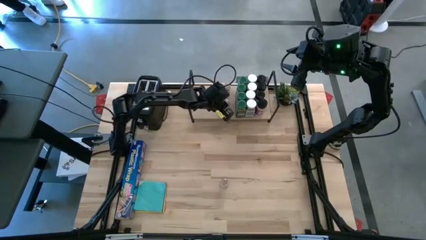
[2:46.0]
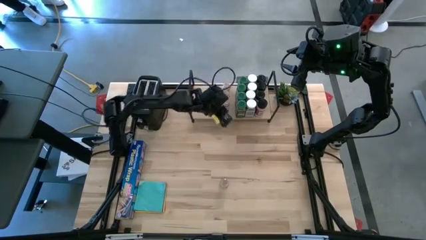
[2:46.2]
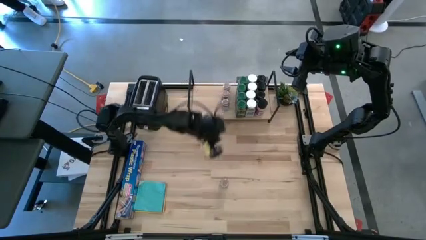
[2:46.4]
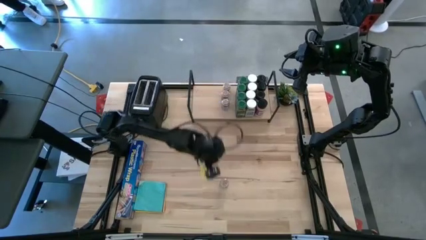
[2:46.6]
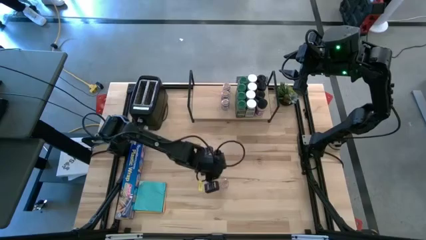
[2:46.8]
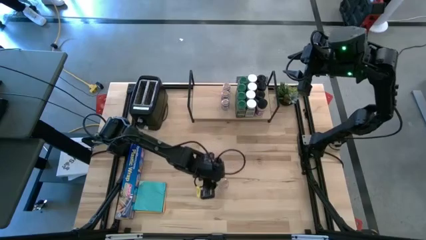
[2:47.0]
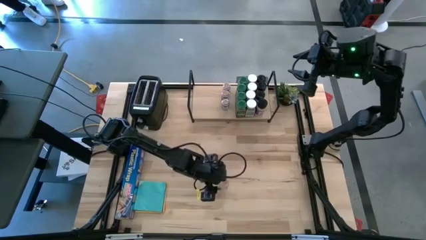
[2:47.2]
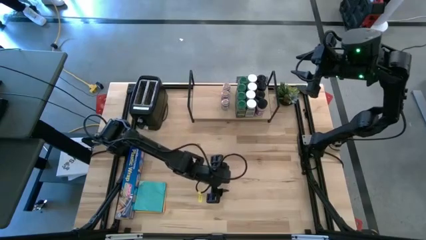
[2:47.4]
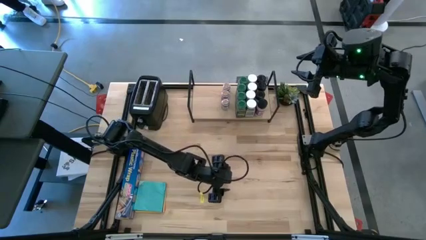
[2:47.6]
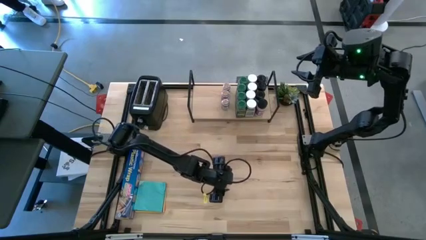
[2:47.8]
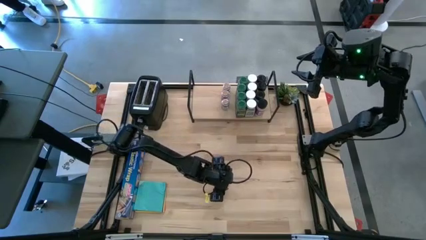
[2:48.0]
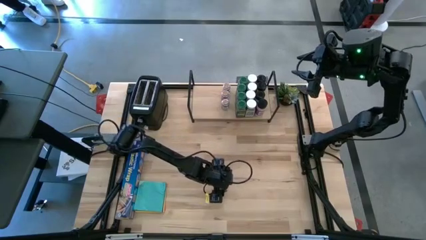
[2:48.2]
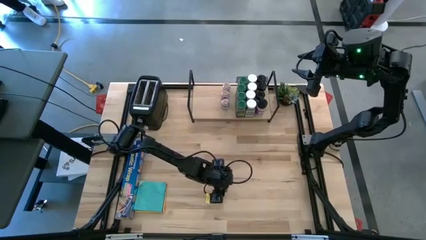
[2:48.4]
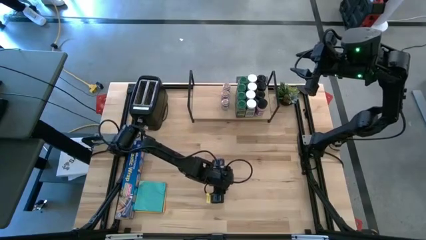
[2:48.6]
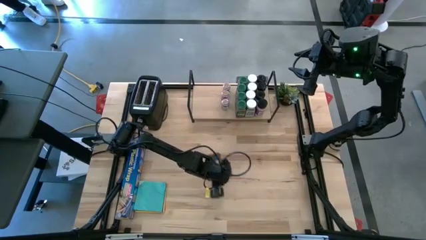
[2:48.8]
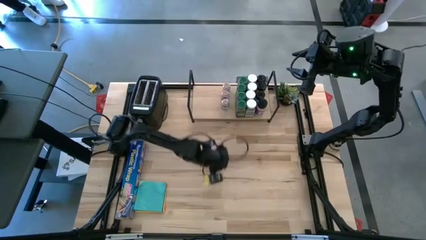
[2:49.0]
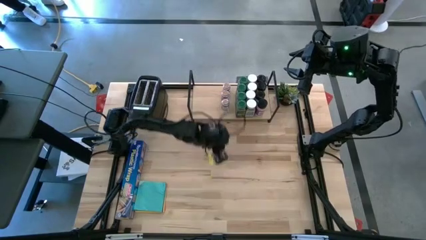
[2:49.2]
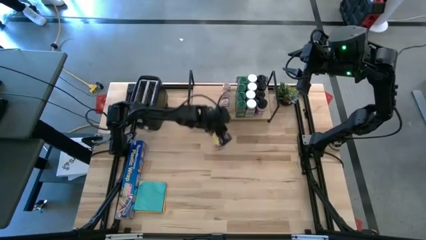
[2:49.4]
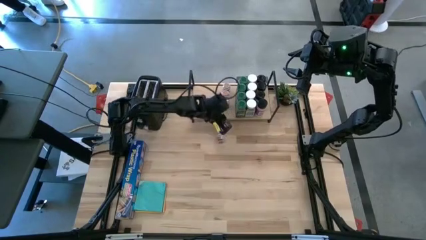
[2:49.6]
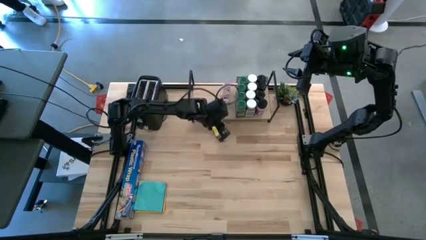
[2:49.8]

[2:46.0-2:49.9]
Task: Shelf spices
Put the brown spice bottle on the shelf and align with the other brown spice bottles

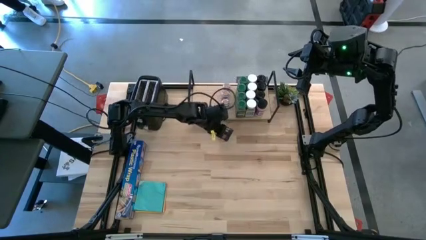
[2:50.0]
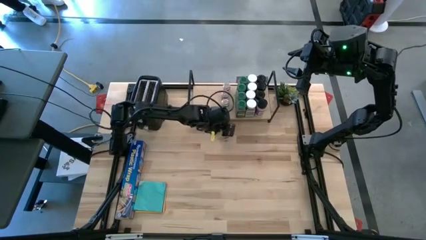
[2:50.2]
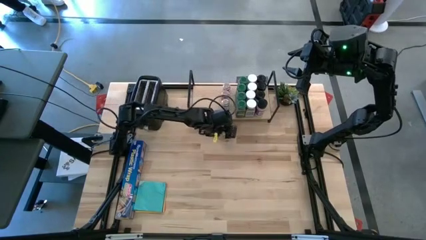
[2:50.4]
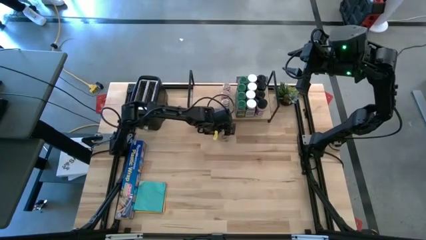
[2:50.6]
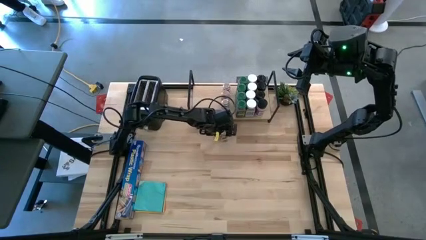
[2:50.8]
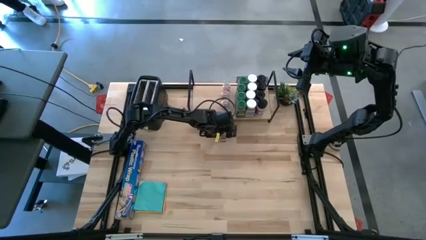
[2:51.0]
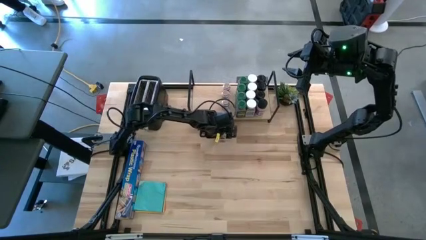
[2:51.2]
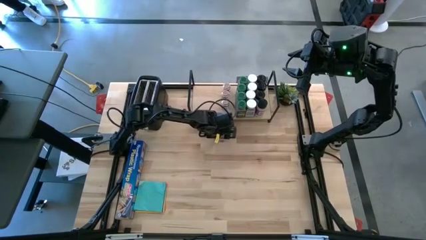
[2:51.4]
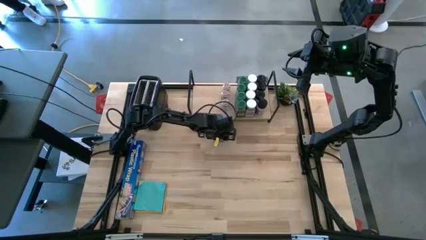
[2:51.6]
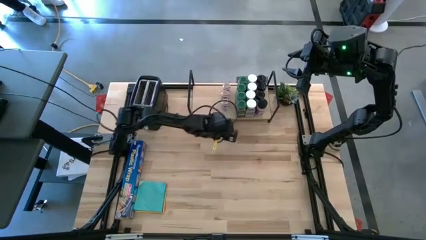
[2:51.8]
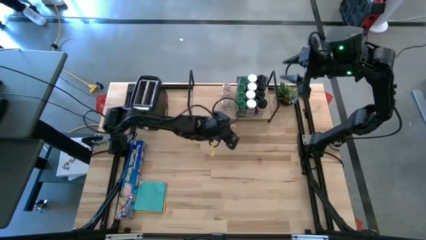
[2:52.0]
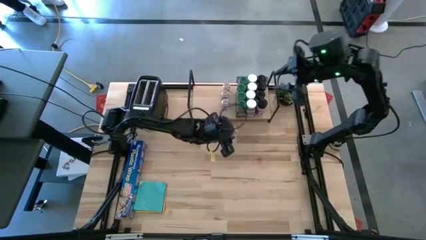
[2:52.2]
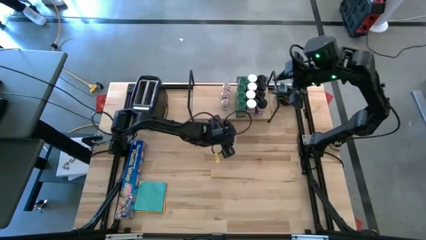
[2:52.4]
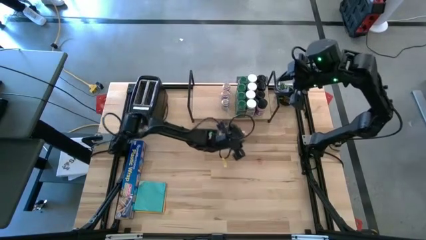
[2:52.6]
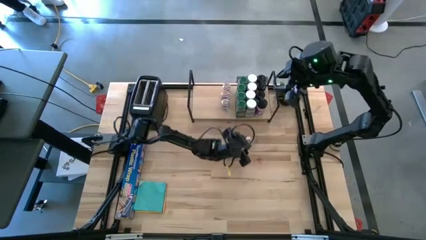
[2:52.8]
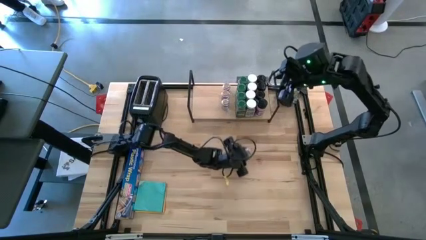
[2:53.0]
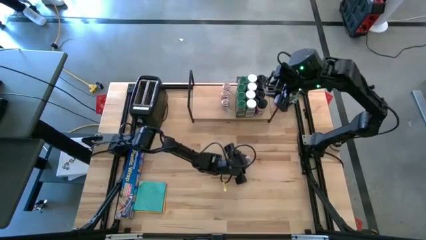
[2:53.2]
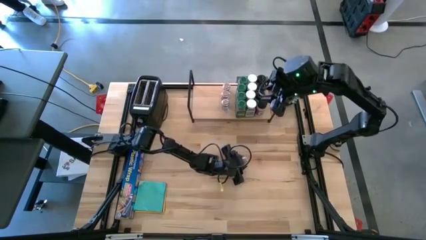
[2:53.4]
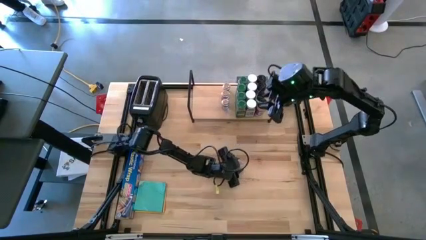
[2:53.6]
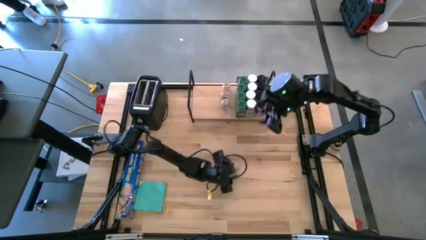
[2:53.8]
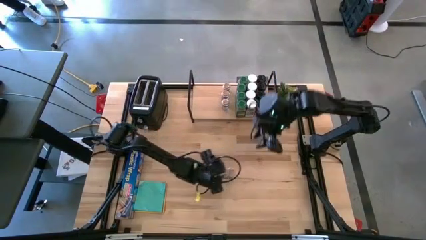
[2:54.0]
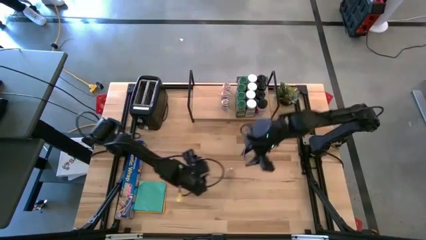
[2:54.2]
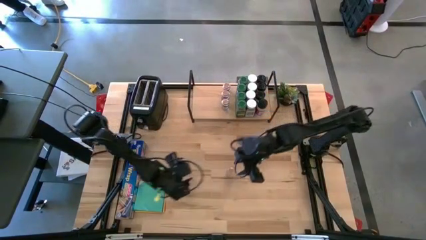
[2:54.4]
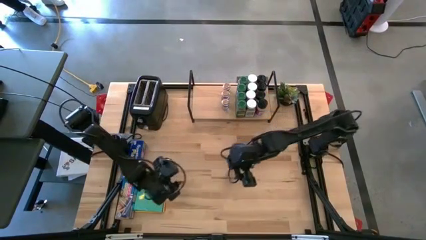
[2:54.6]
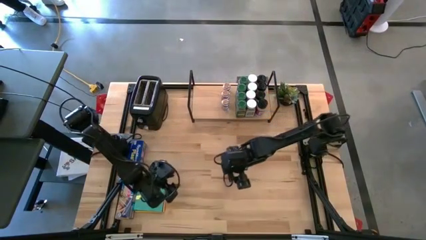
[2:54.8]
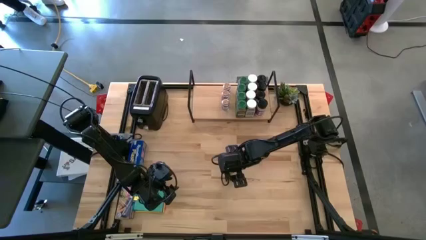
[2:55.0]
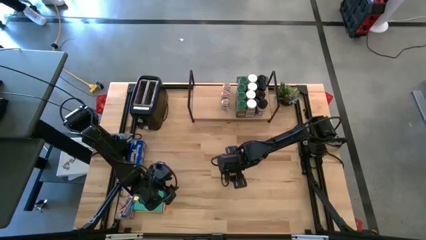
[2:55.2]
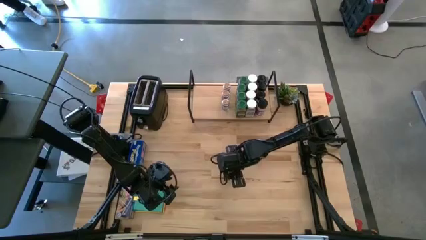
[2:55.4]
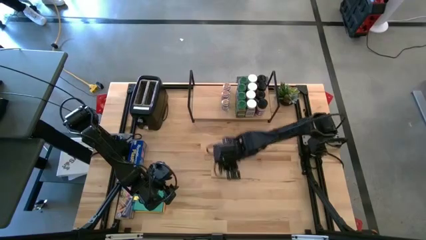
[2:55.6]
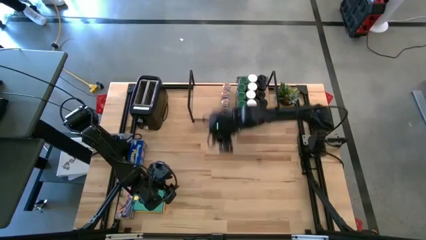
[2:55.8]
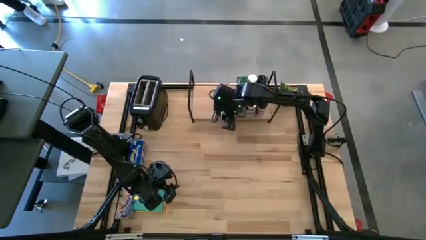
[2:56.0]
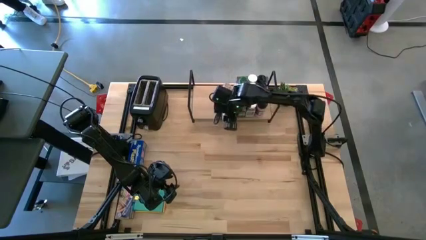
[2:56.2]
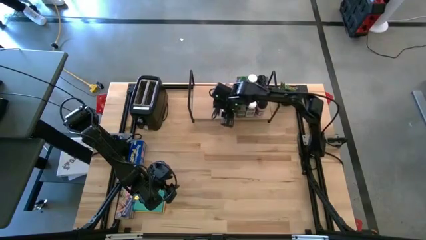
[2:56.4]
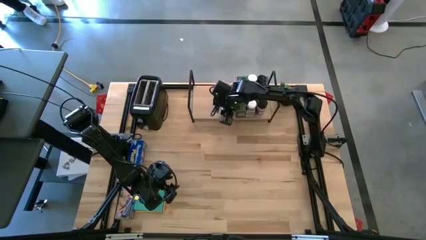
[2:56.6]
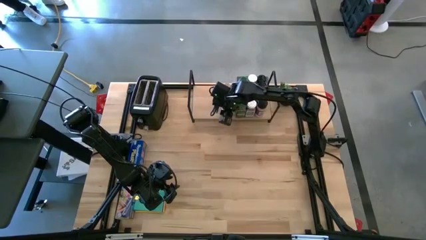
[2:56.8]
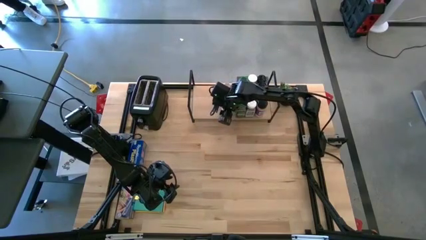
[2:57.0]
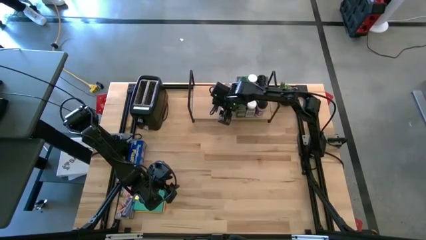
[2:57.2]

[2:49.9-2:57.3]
Put the brown spice bottle on the shelf and align with the other brown spice bottles

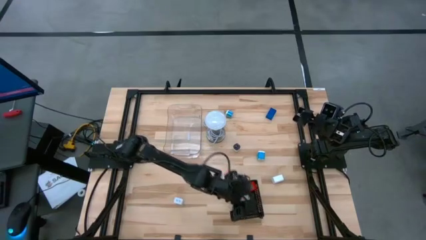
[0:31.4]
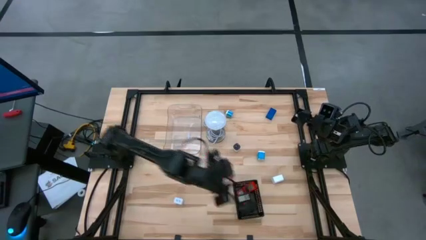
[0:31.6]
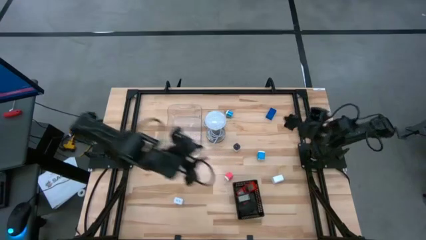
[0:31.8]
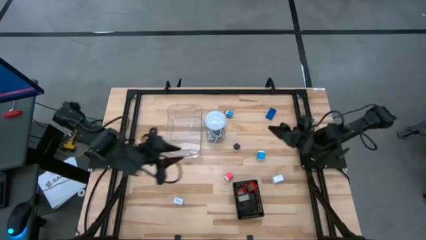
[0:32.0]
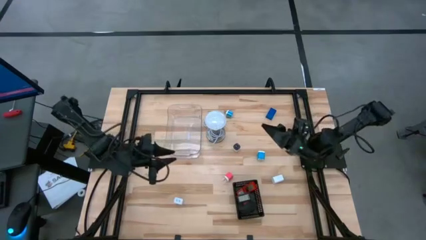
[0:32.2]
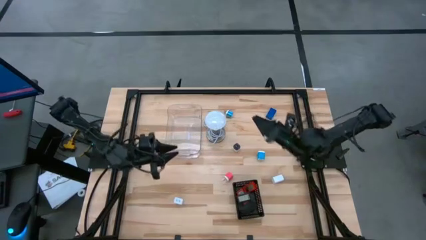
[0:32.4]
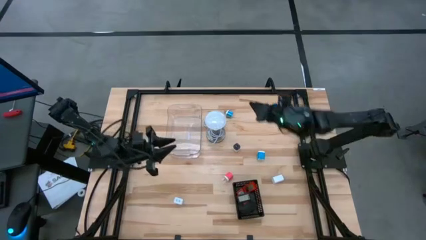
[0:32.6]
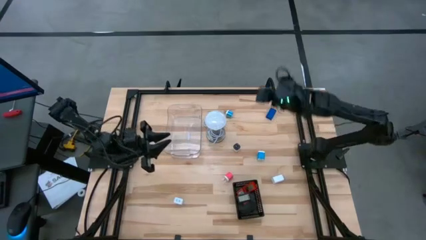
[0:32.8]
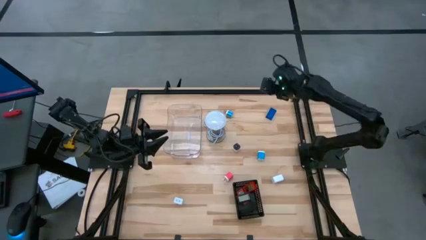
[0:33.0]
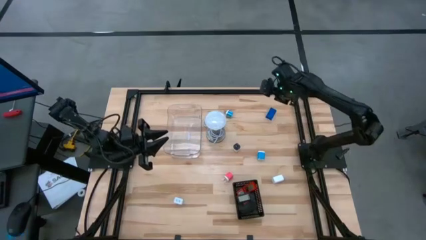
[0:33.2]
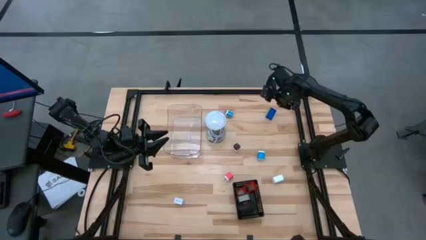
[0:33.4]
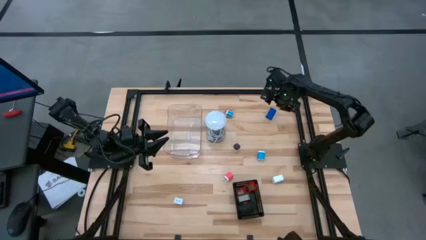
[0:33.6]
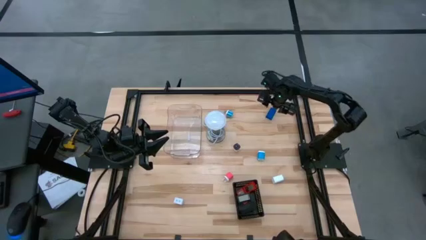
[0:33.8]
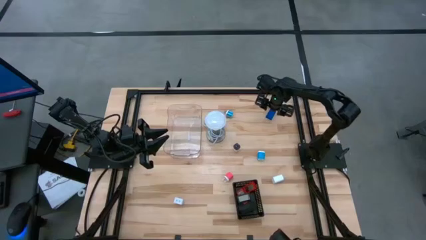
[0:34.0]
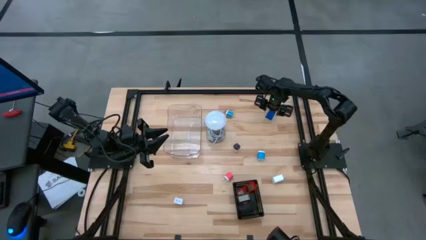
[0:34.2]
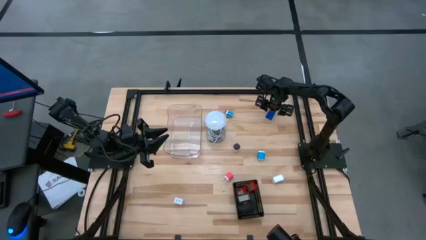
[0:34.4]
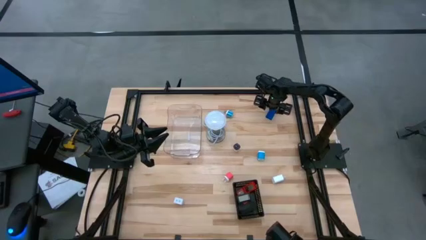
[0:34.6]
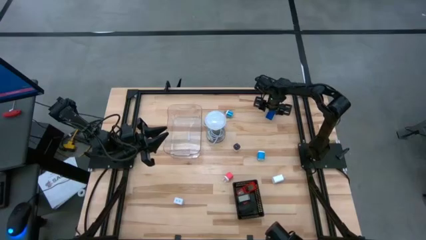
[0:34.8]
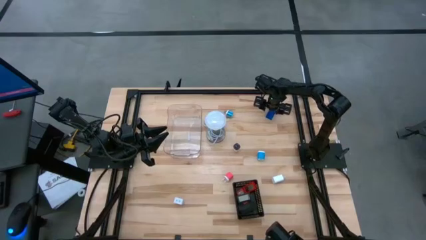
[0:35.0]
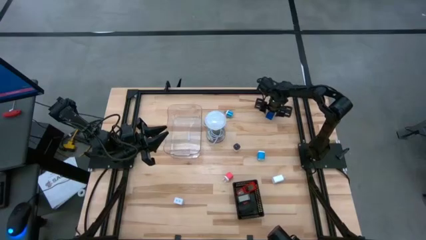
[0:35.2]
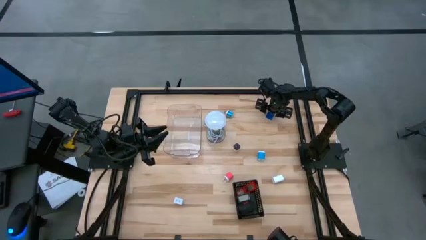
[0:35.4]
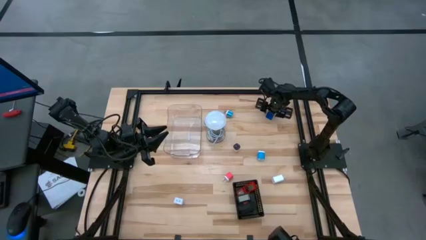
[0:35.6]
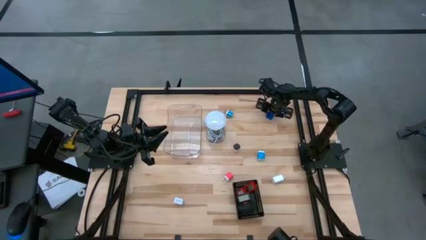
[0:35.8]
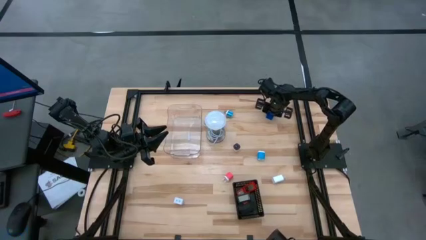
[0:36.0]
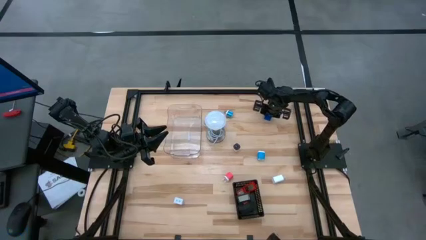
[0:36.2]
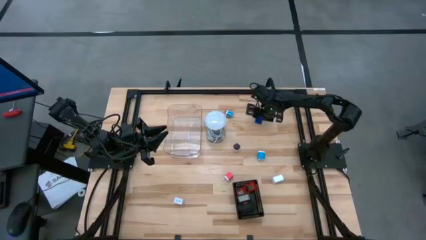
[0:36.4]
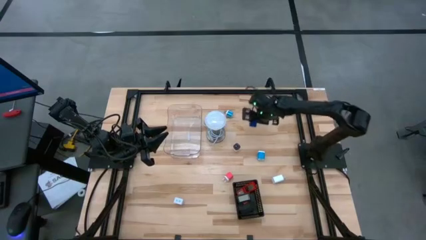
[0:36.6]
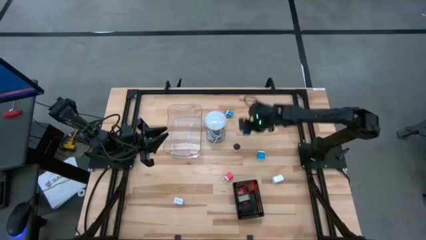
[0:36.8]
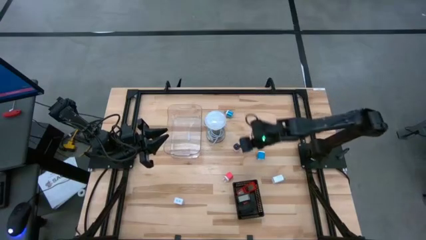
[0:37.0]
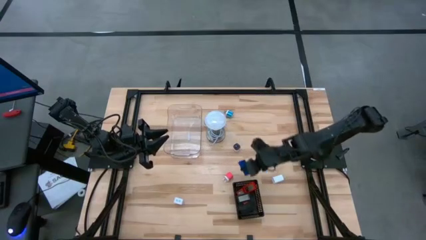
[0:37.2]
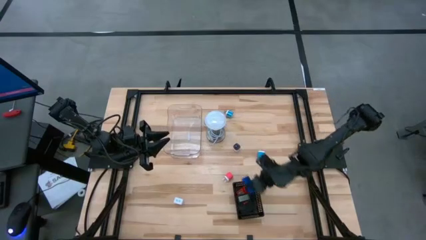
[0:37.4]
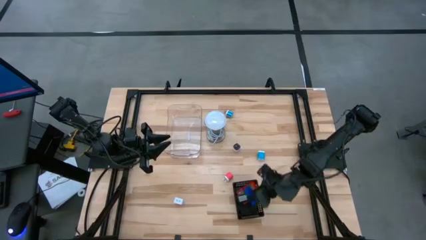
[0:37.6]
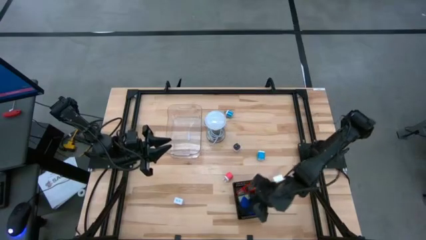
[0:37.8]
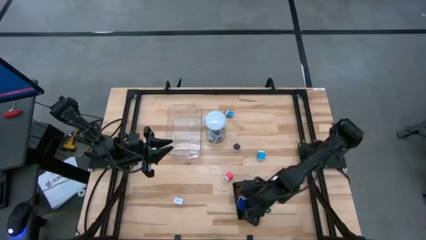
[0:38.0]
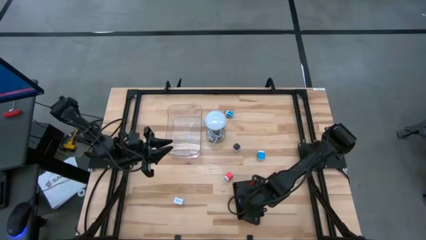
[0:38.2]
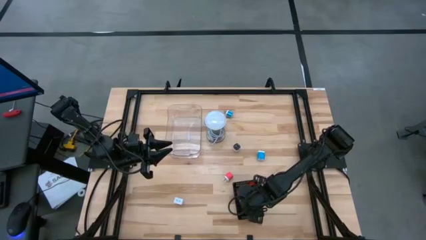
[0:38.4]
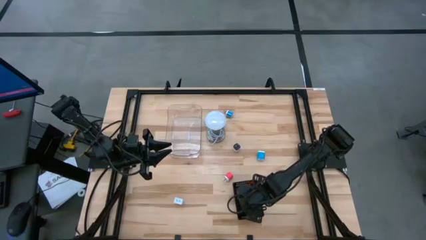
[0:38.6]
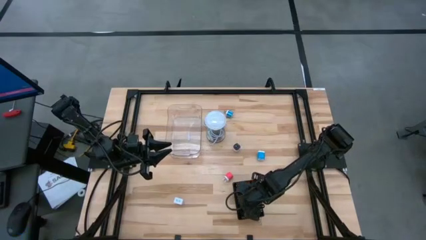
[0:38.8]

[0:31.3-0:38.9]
Task: Pick & Place Office items
Put the blue digital clock into the black bin
